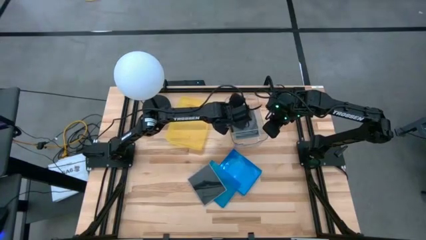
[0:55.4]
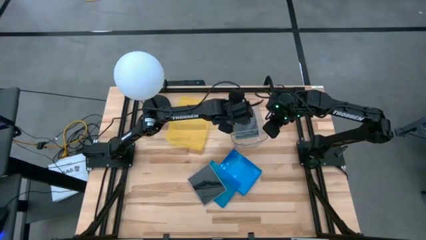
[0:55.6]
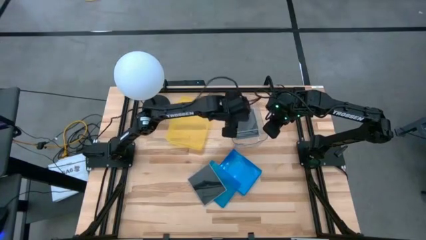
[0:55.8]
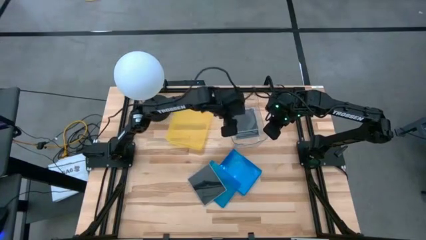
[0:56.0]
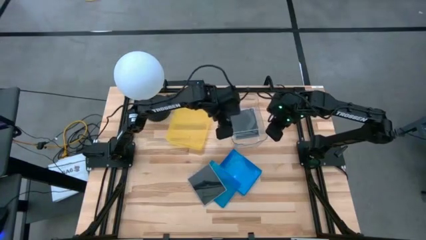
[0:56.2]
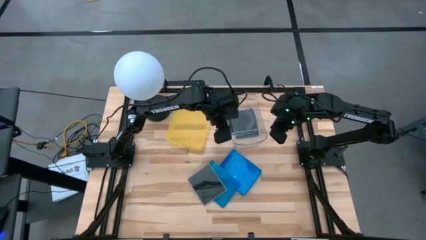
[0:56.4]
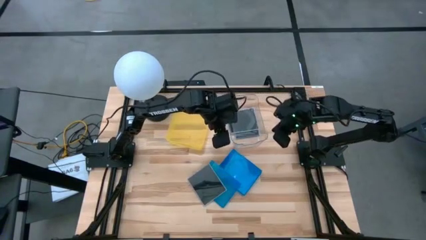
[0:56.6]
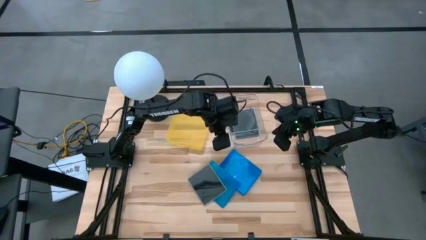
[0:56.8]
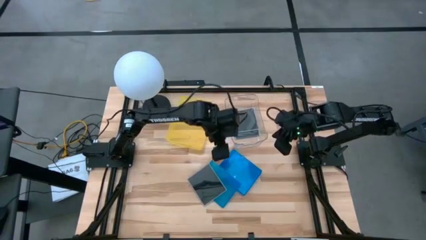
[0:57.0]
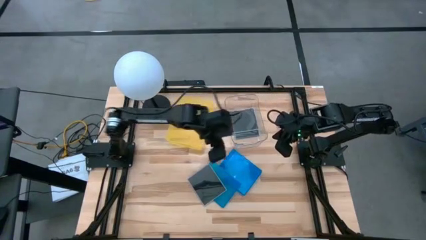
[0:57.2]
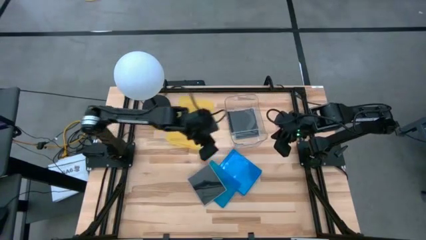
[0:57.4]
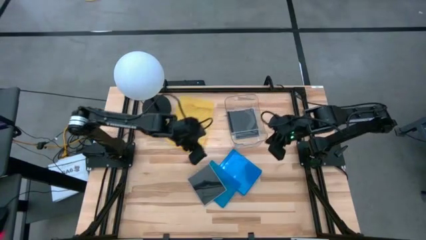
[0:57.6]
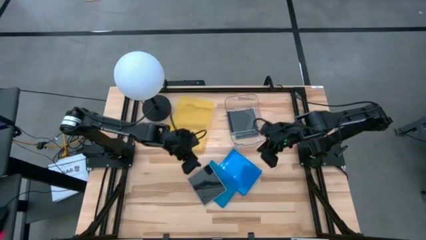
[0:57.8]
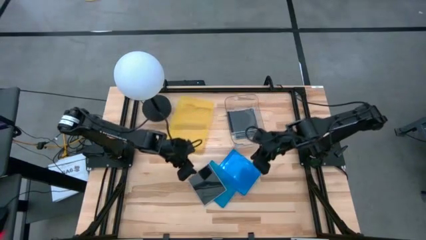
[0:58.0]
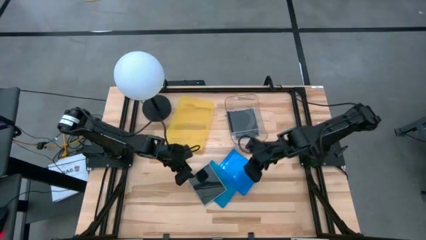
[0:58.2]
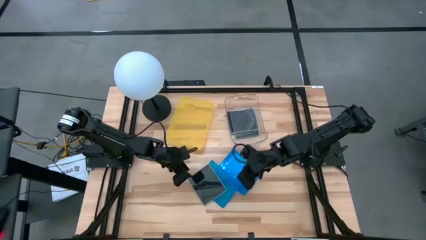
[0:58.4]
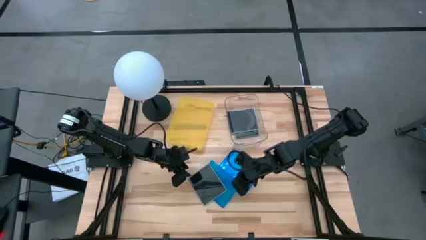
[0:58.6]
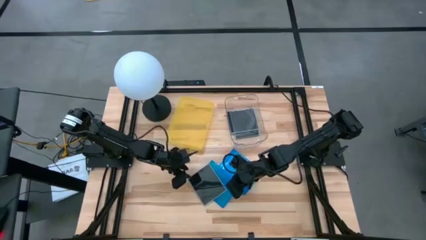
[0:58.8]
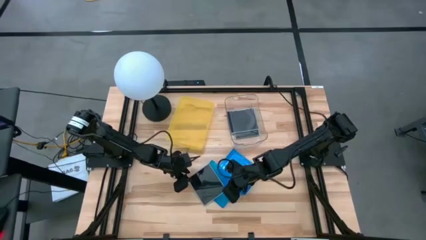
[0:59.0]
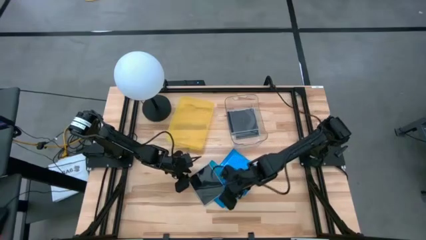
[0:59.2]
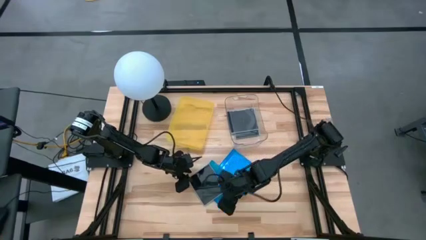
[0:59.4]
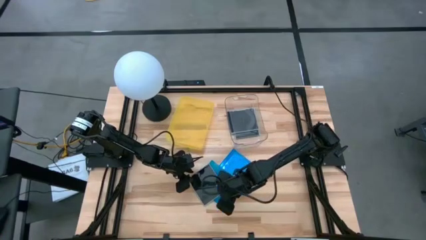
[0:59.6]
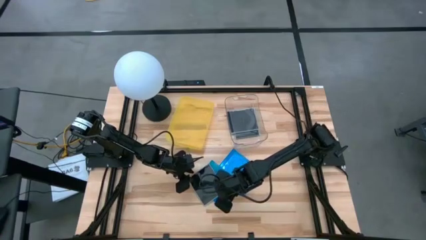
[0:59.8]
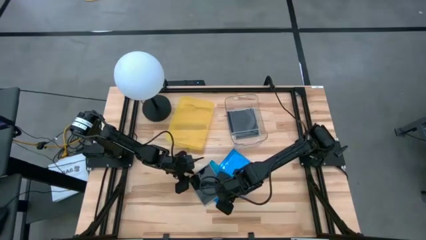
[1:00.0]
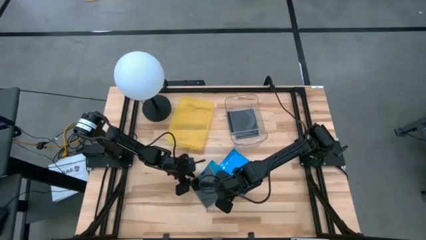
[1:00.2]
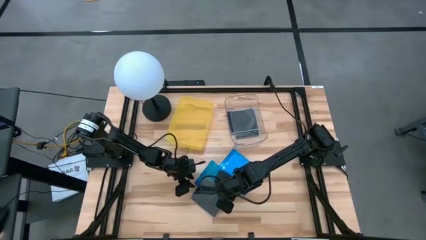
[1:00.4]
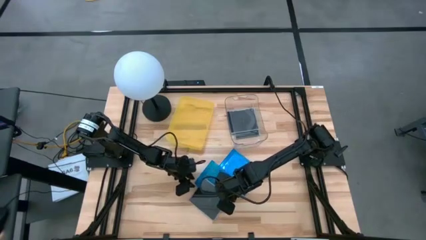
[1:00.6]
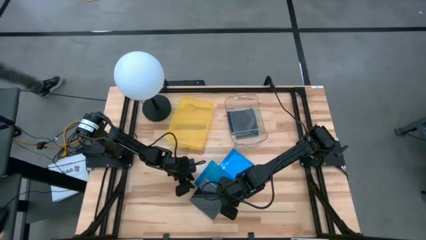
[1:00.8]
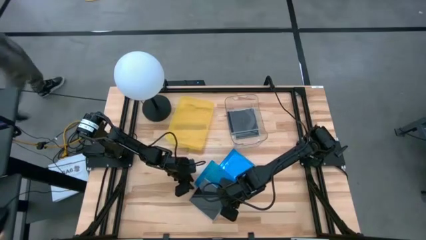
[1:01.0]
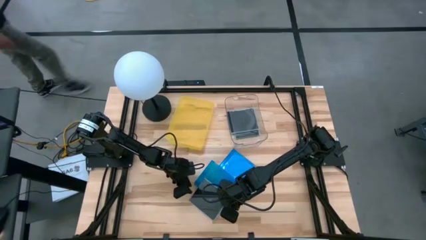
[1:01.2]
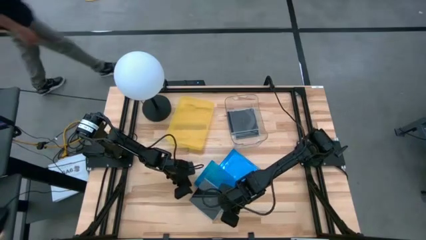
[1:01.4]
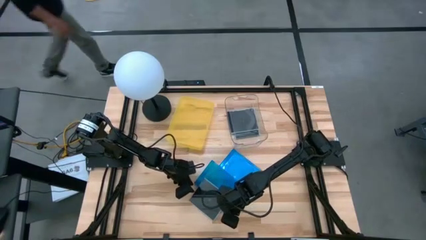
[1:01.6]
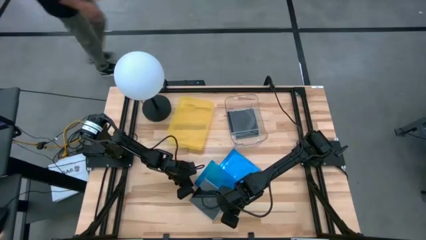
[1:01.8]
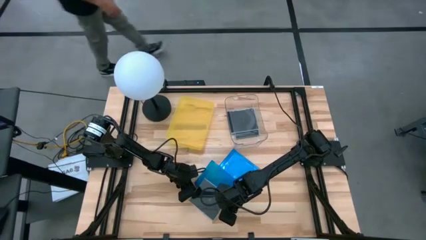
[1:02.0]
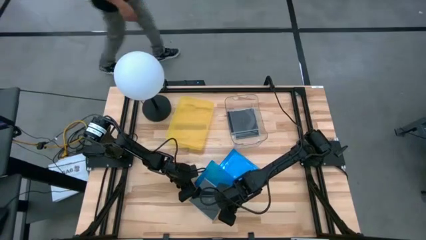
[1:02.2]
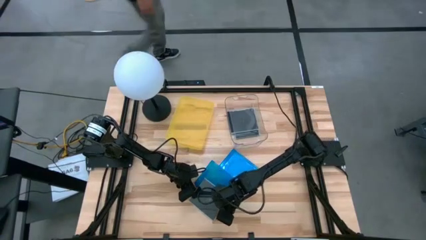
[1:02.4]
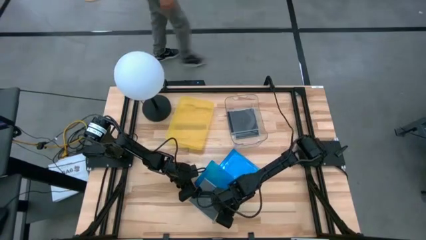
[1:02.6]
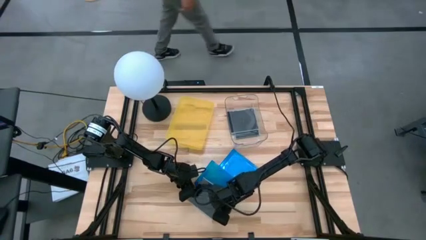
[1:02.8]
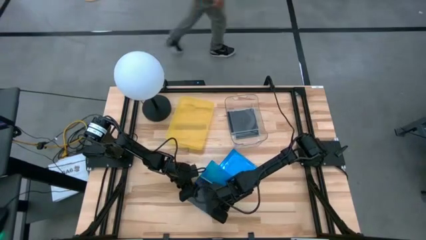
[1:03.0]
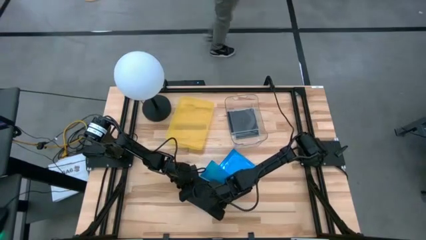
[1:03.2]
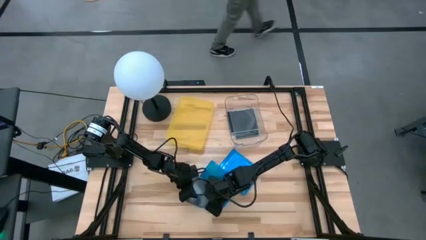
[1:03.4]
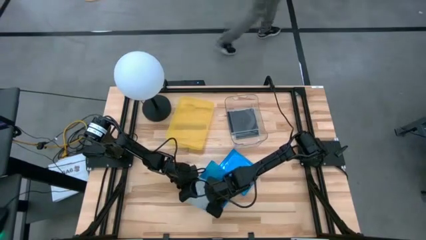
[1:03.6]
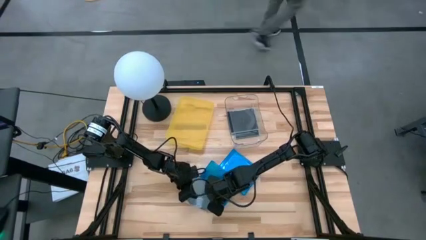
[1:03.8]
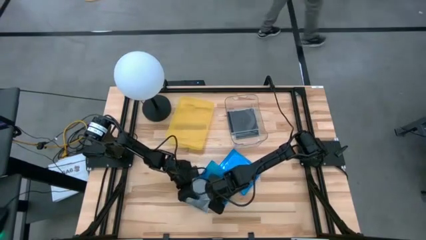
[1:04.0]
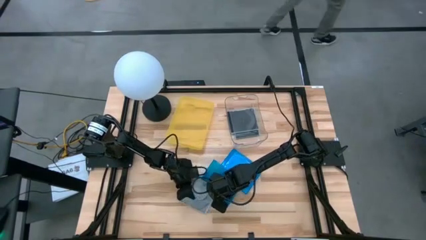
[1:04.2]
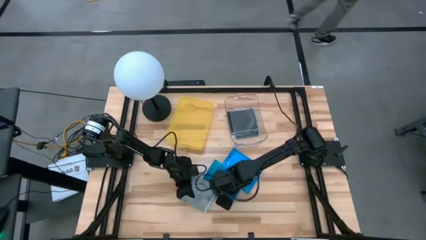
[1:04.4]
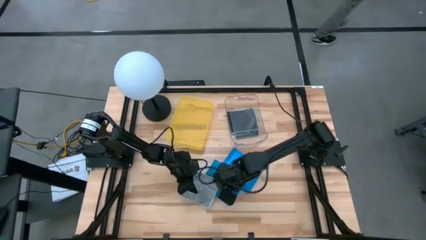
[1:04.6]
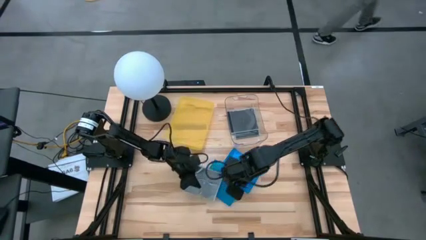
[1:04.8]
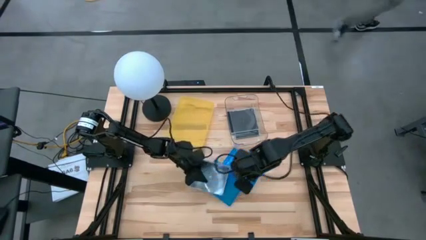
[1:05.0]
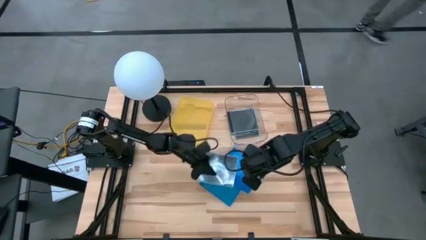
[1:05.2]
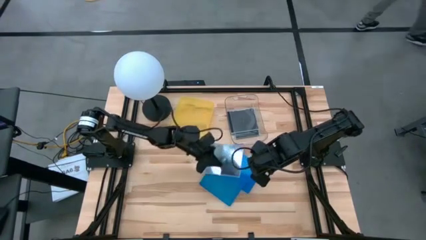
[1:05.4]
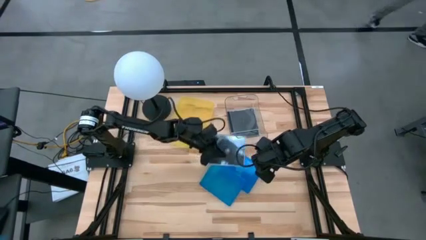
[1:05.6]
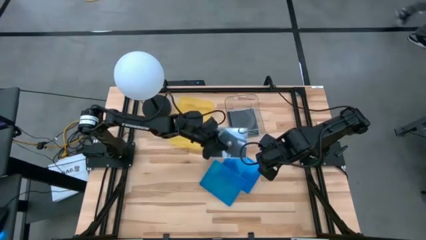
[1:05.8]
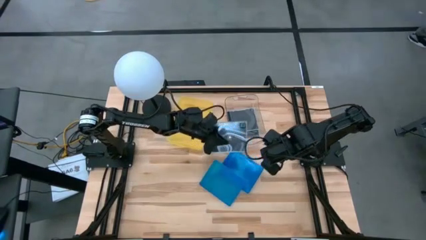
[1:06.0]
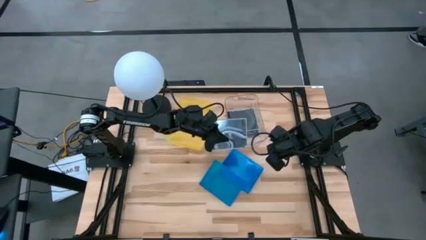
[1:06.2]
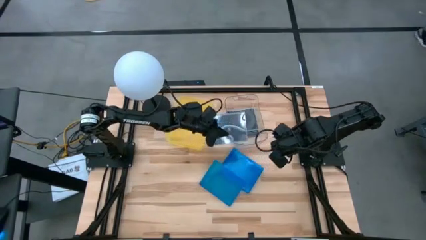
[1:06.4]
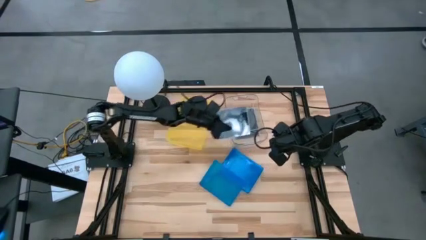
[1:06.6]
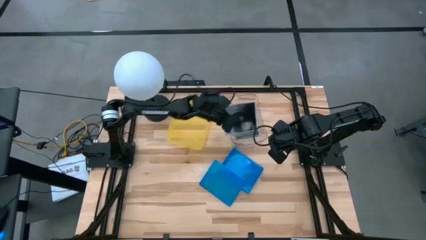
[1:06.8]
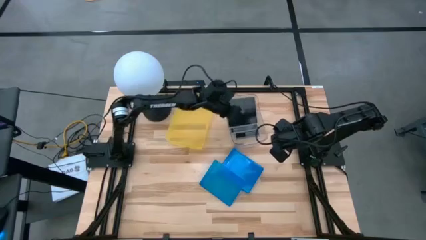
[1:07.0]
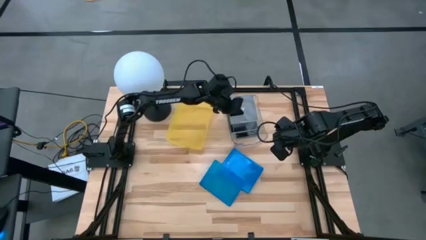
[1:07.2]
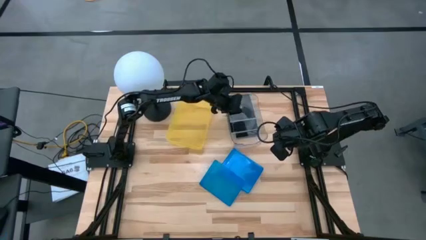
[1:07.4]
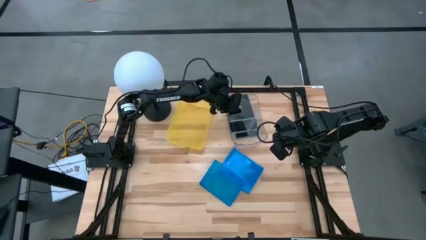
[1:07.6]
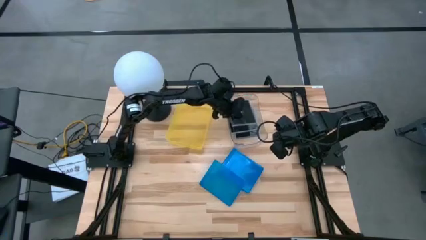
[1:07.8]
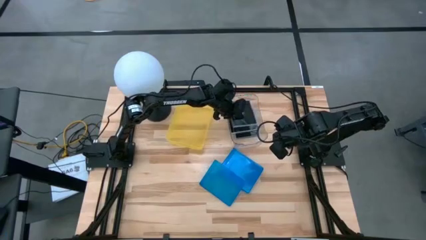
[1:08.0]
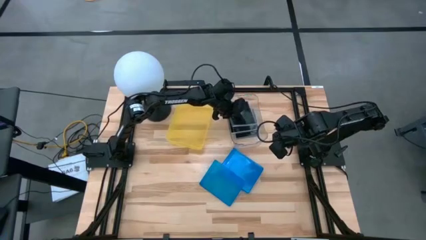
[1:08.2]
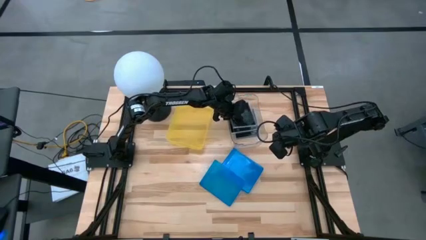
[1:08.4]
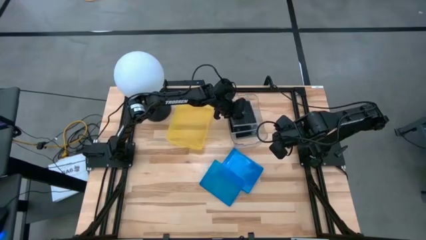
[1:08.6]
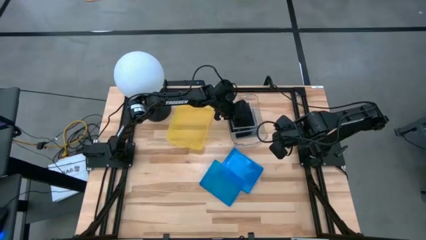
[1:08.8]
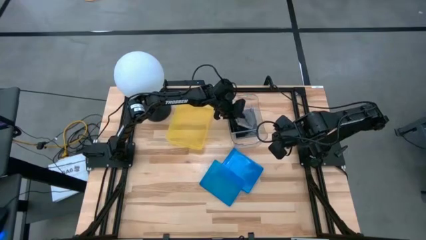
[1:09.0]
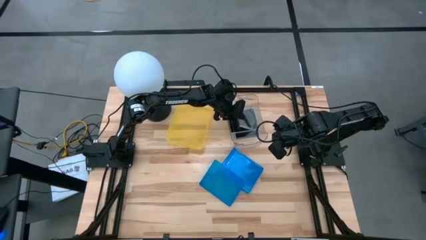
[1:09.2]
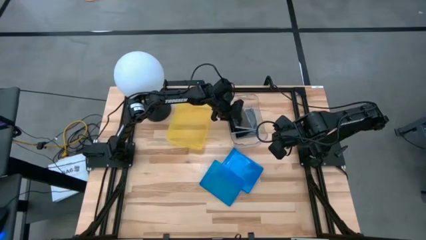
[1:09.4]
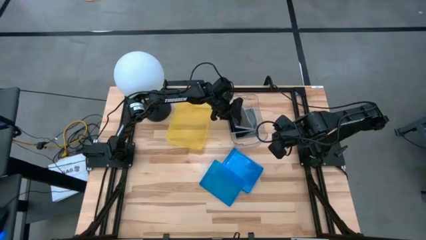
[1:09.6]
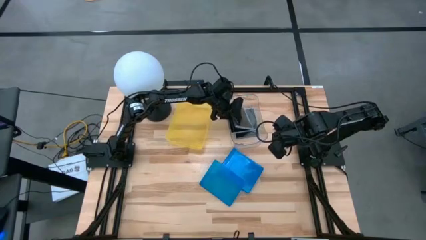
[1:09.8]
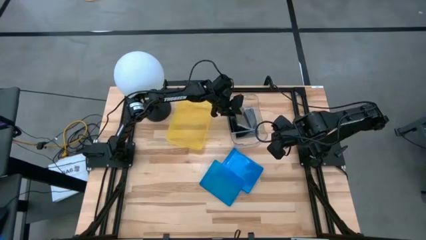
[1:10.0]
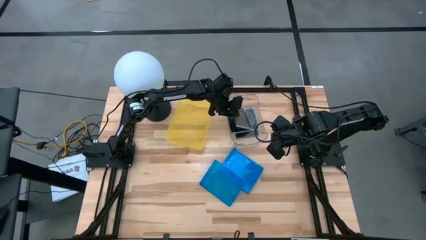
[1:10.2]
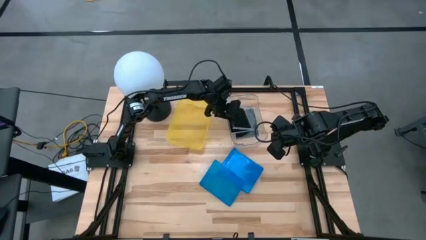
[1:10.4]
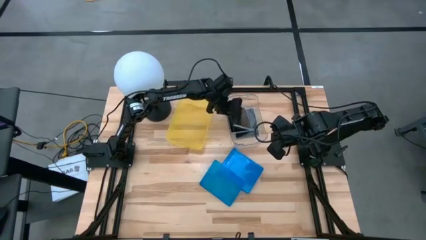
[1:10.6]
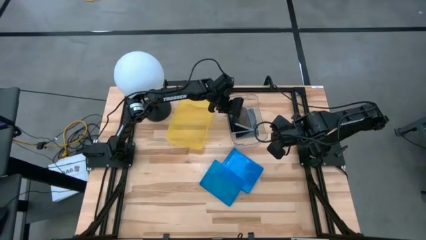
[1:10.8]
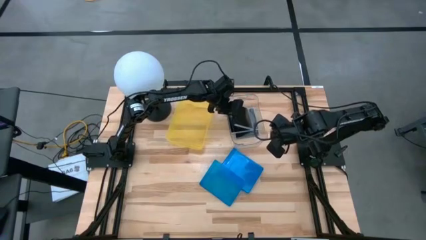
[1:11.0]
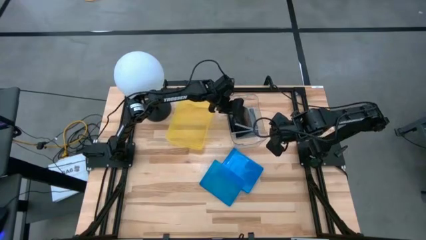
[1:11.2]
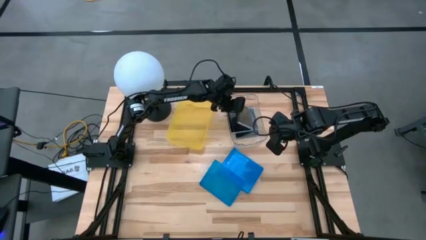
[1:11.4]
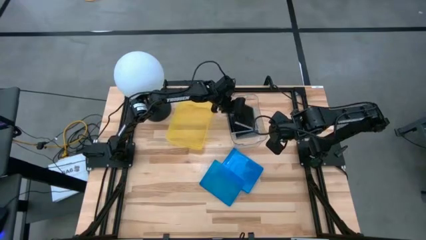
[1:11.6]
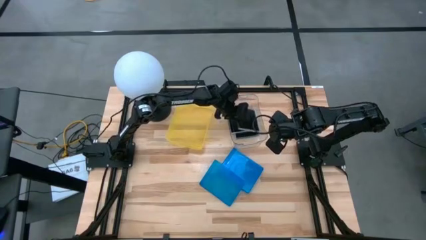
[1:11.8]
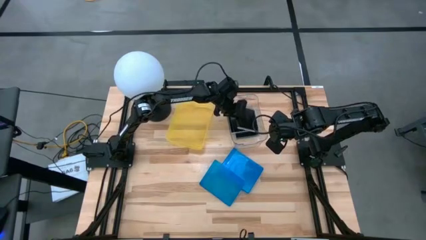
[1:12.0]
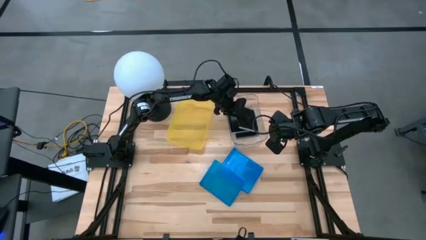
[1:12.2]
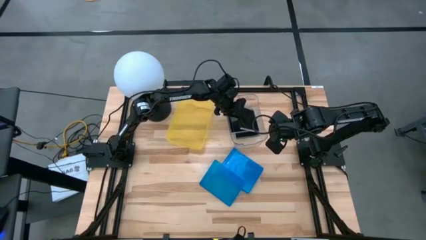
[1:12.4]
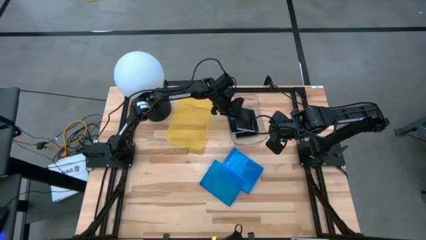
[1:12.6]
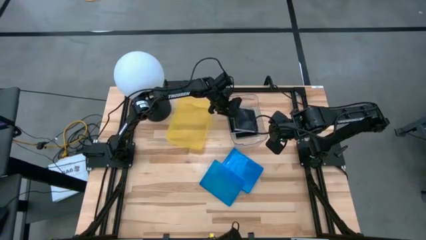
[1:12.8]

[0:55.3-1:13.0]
Task: Pick & place jewel cases by type
Put the black CD case into the transparent bin
